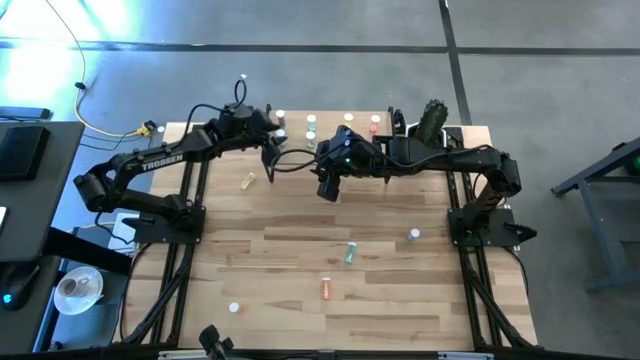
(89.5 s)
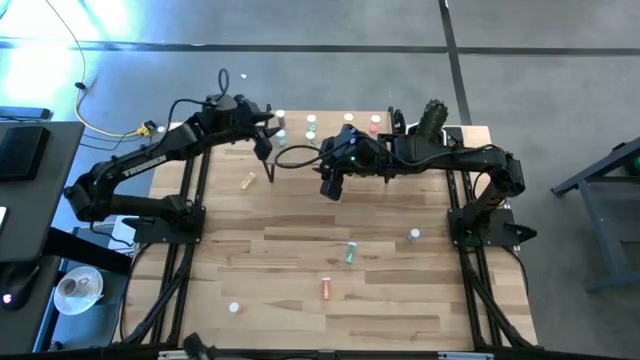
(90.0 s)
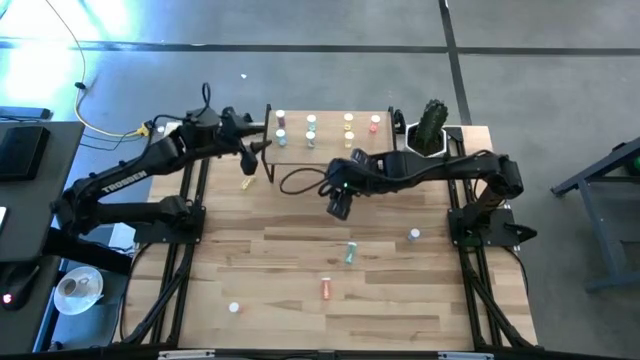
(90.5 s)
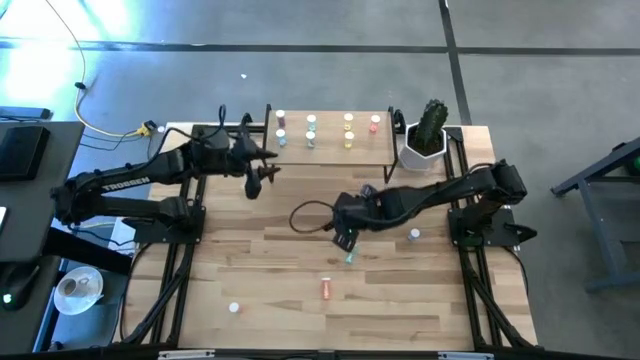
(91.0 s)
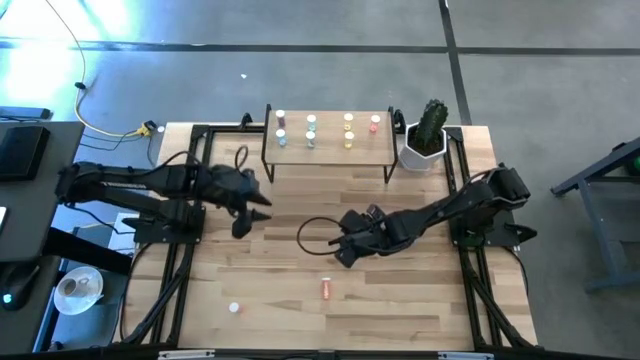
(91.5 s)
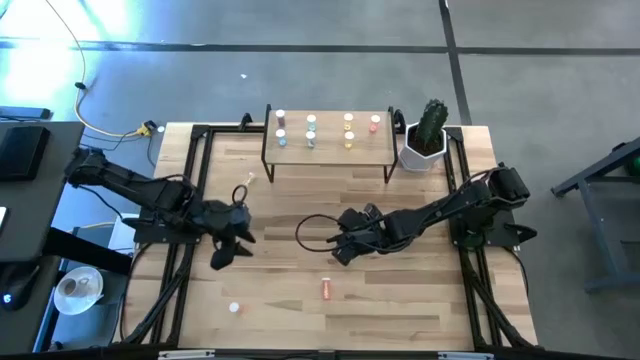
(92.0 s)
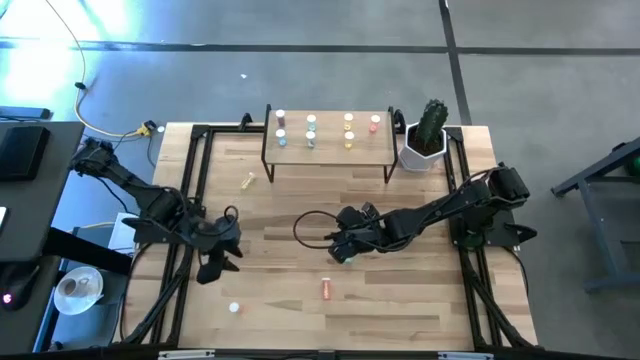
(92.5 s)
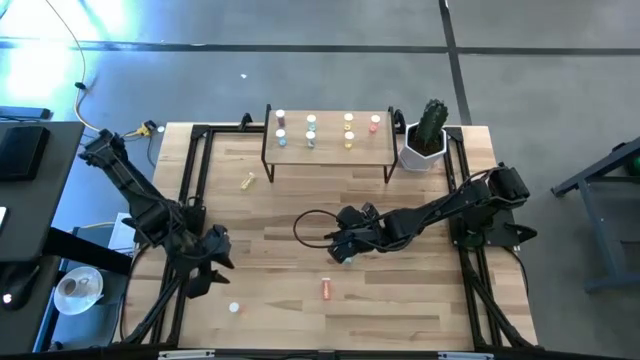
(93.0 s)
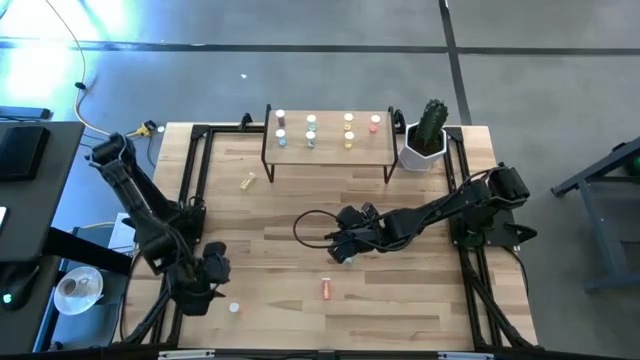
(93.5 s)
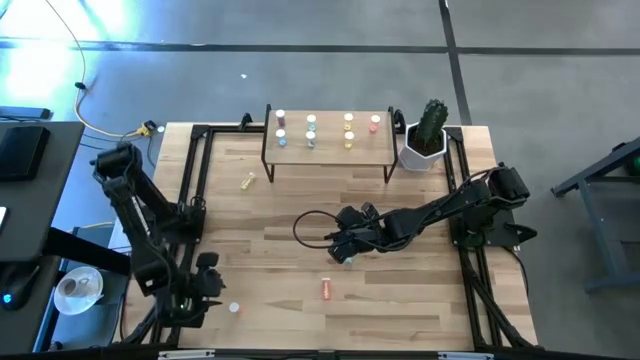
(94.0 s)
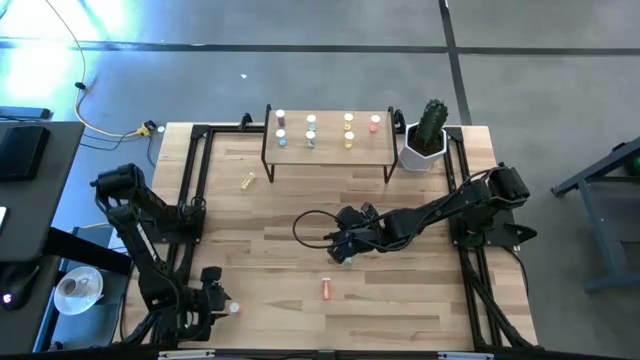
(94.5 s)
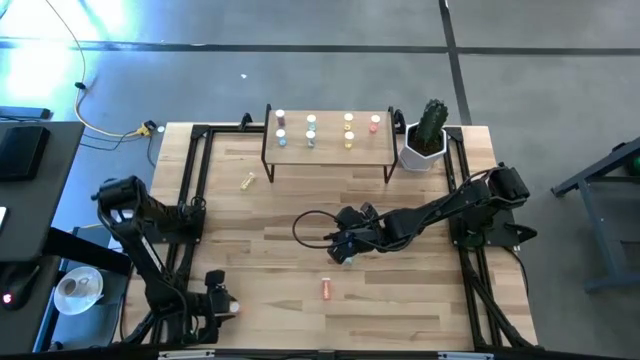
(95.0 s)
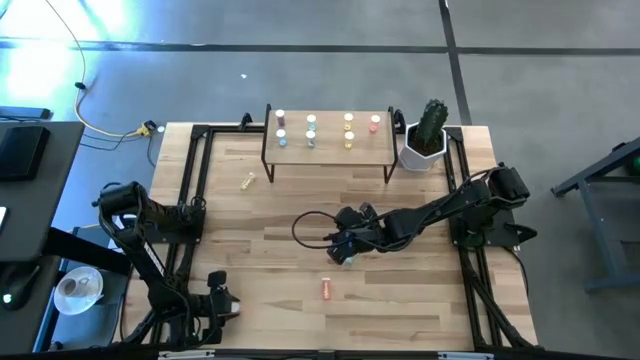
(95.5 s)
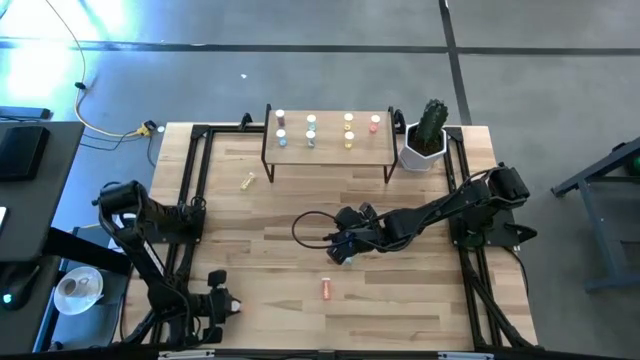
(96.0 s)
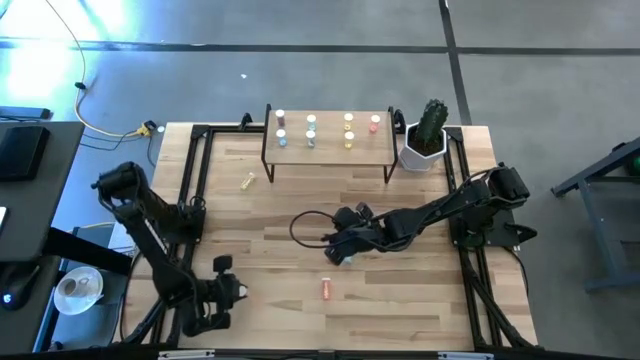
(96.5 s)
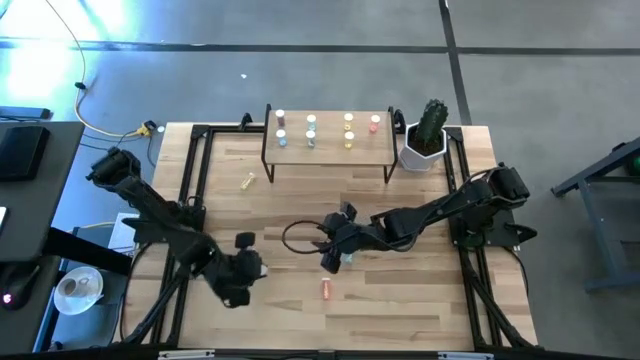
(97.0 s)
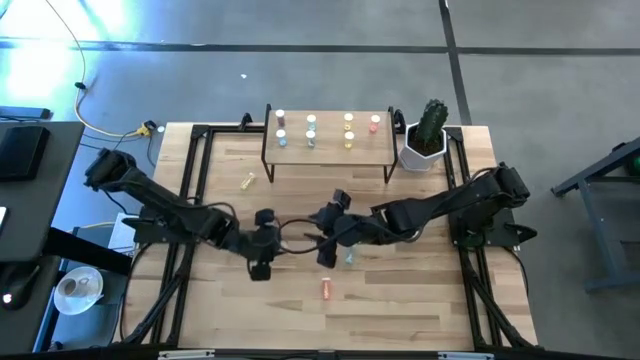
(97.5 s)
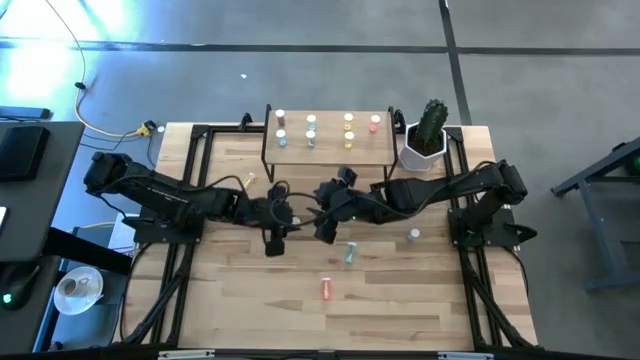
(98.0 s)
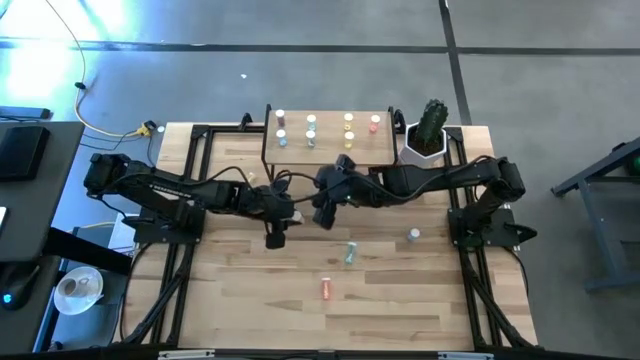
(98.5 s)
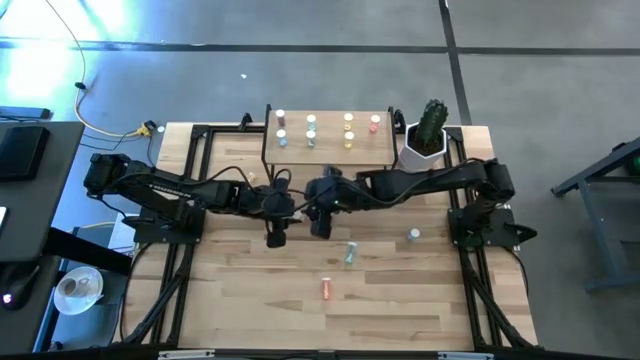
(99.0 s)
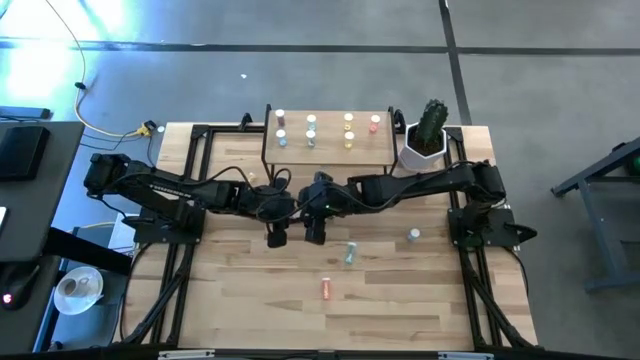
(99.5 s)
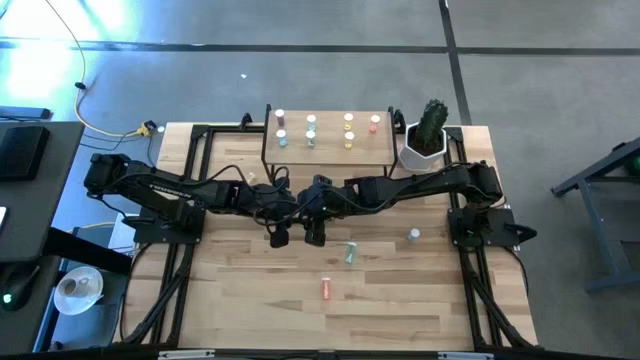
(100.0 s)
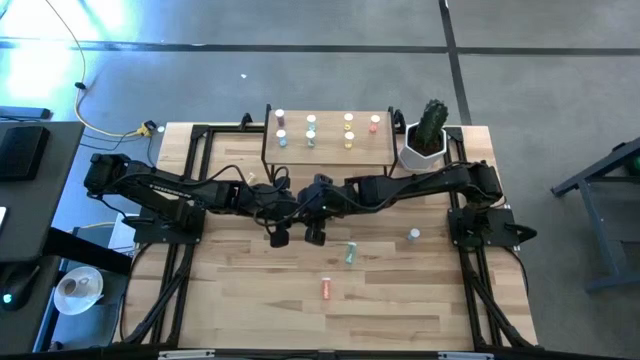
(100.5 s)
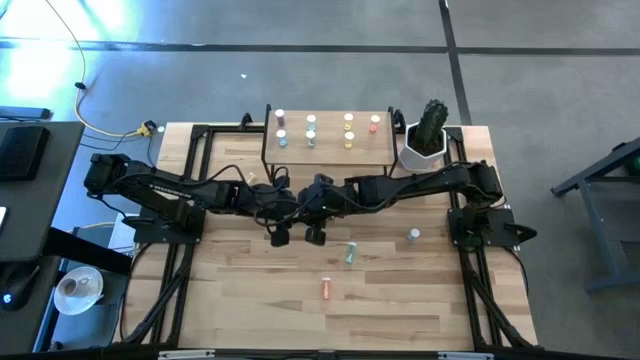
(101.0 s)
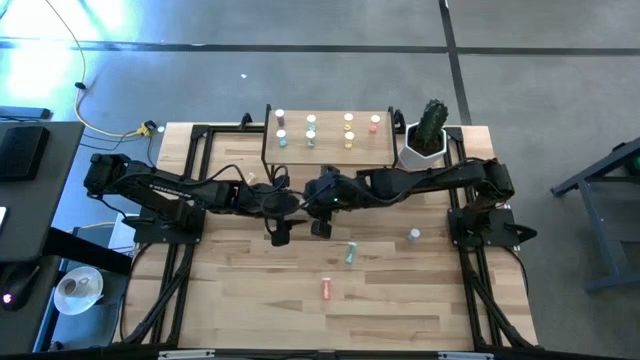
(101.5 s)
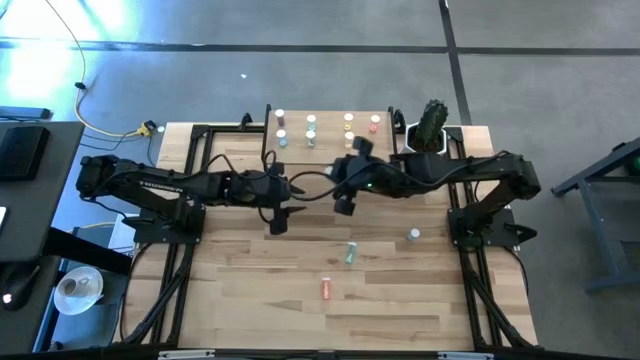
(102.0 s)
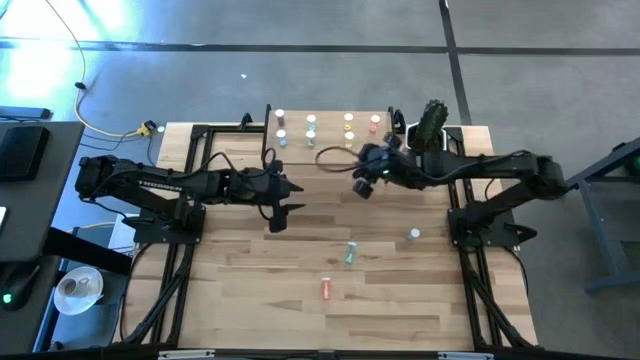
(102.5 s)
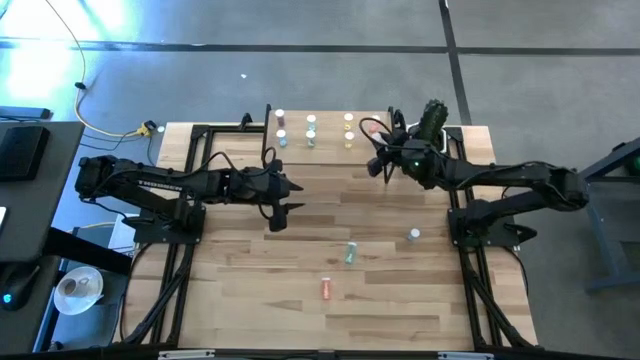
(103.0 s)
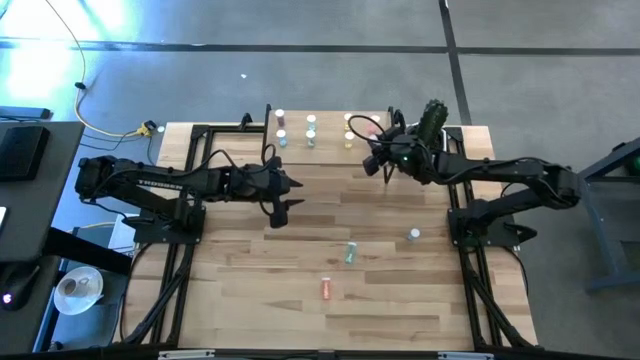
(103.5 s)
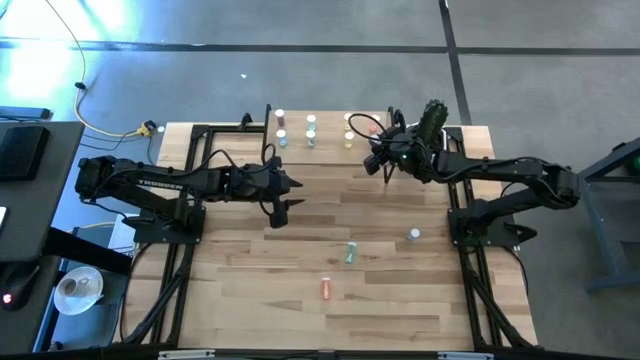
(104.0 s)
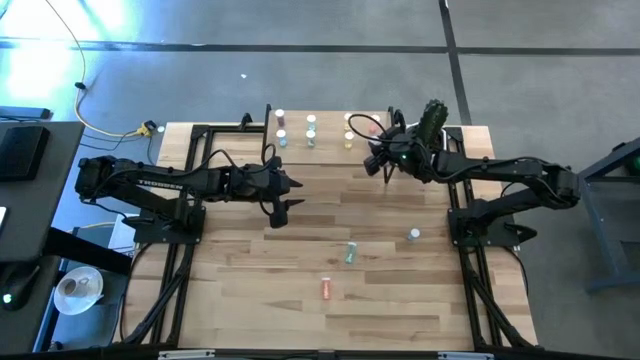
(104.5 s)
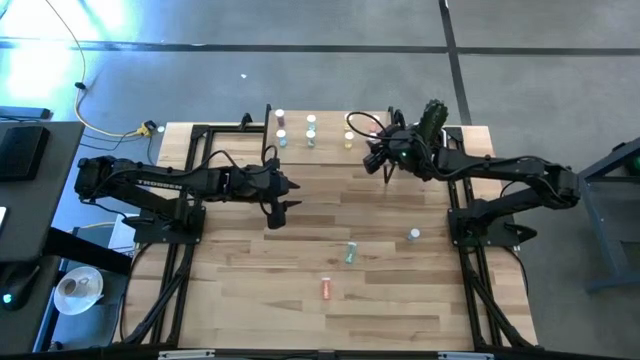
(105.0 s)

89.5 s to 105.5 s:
Task: Pick and place medicine bottles onto shelf by color
Put the left pink pill bottle on the shelf aligned with the other pink pill bottle

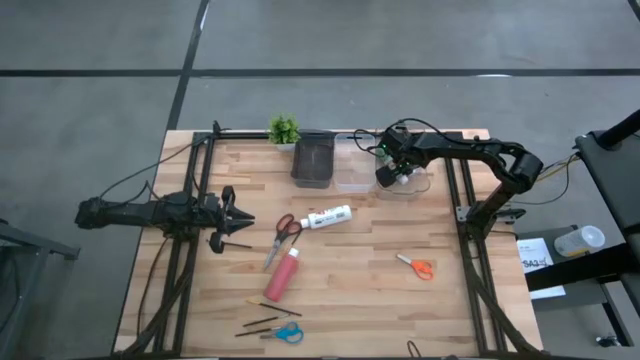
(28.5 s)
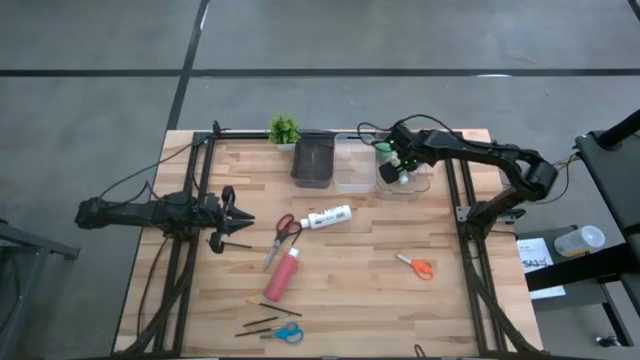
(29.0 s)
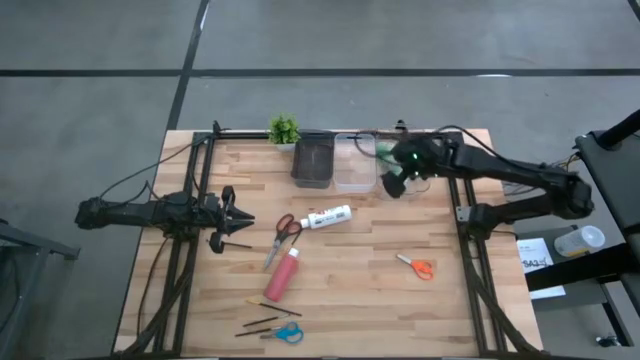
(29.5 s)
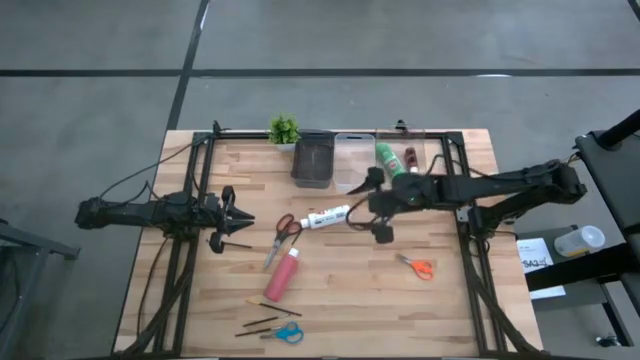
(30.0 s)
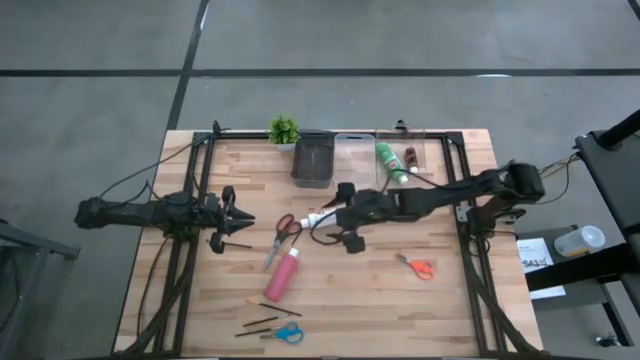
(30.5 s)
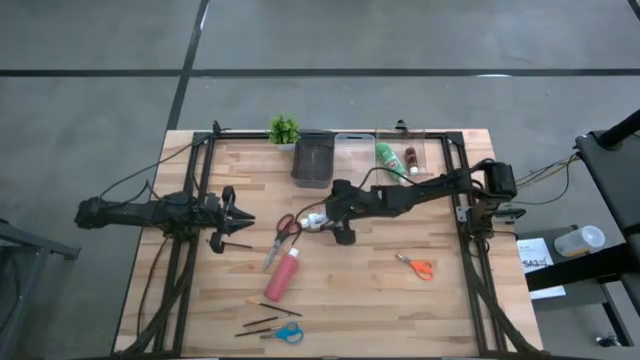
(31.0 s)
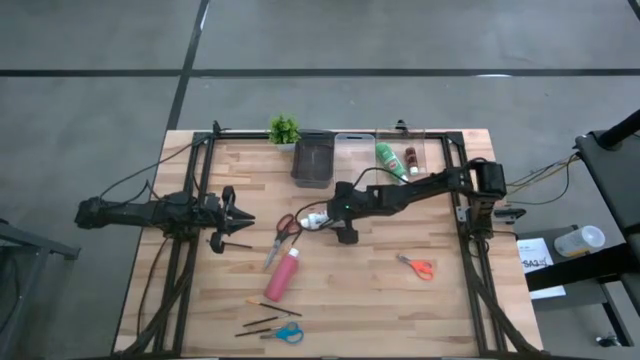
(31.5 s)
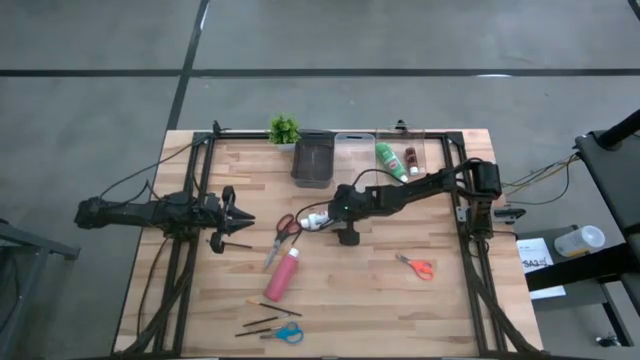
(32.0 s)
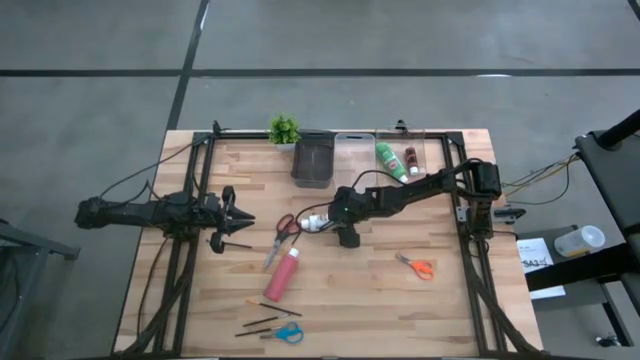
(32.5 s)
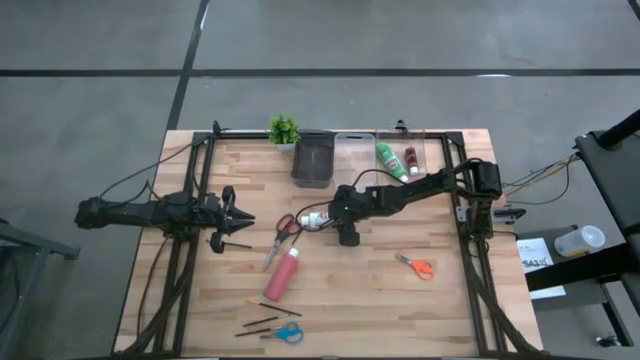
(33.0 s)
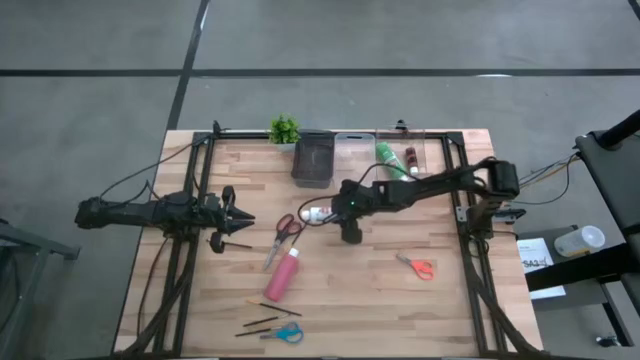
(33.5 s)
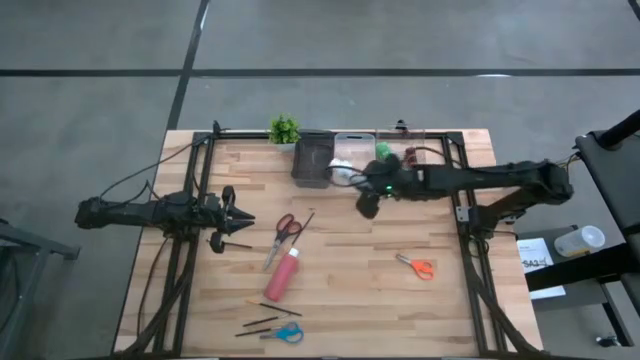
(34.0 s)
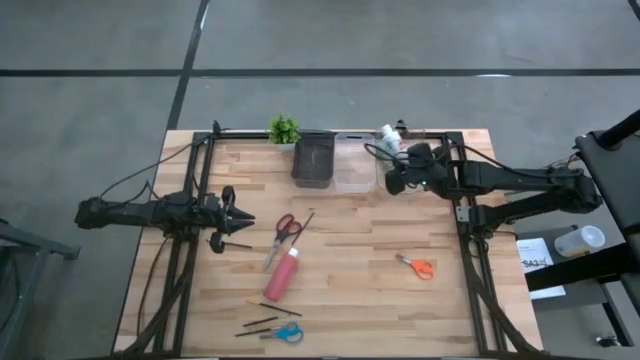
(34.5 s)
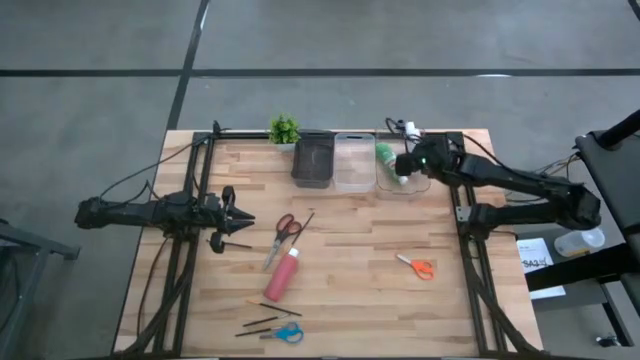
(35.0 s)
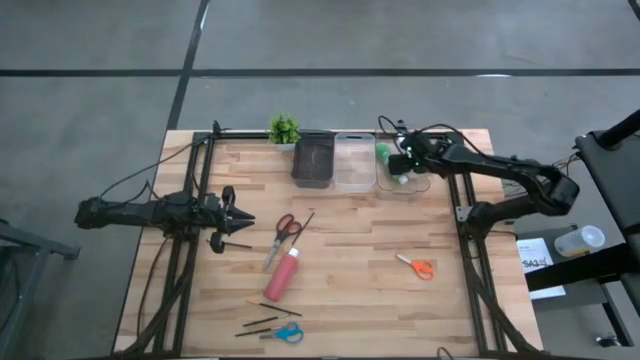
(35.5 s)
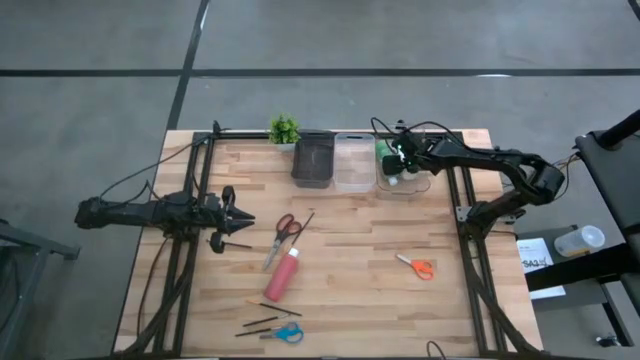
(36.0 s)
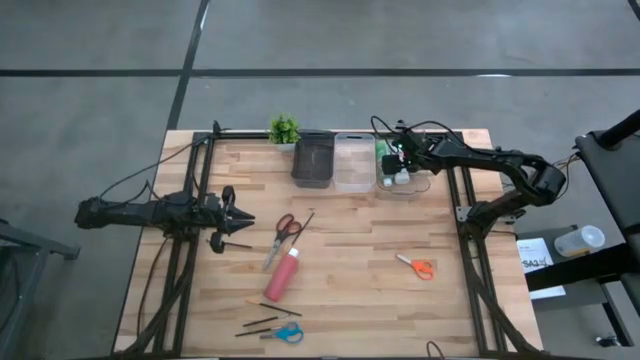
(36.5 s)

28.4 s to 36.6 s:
Task: Pick & Place Paint Supplies
Put the white paint bottle into the transparent bin
